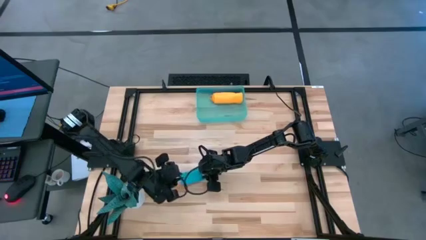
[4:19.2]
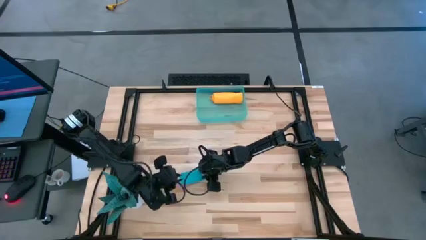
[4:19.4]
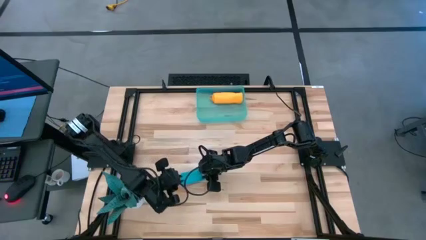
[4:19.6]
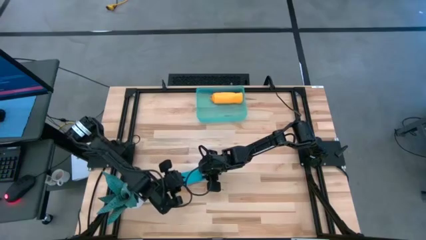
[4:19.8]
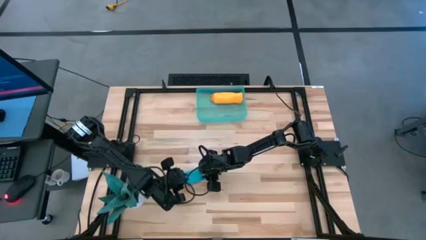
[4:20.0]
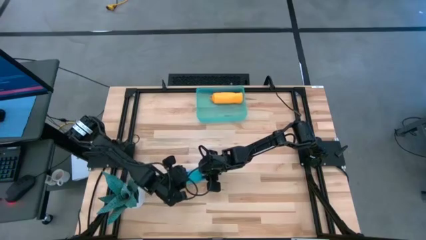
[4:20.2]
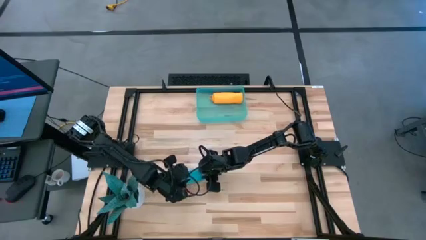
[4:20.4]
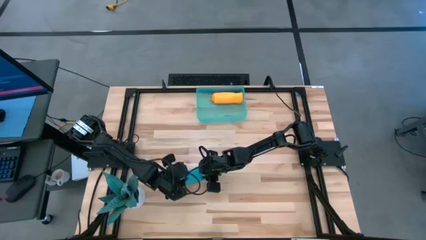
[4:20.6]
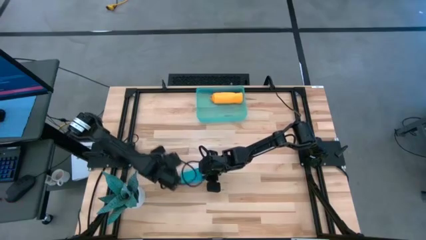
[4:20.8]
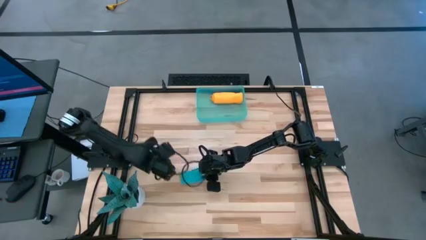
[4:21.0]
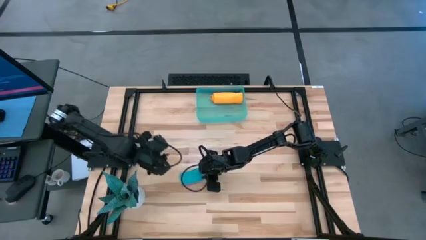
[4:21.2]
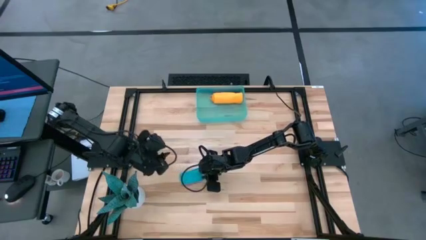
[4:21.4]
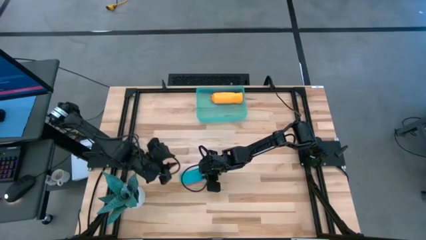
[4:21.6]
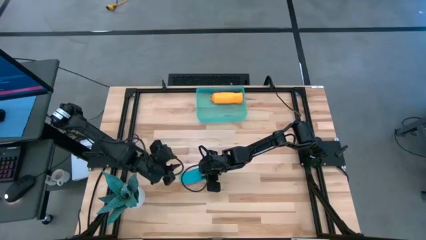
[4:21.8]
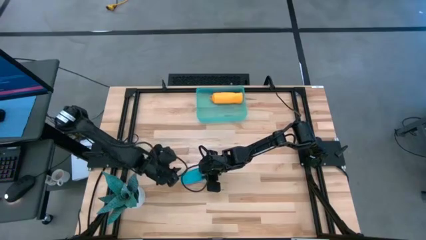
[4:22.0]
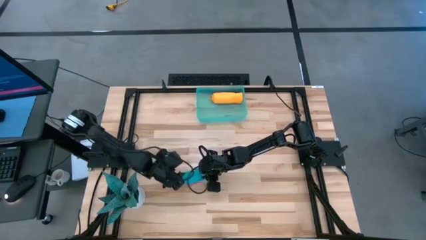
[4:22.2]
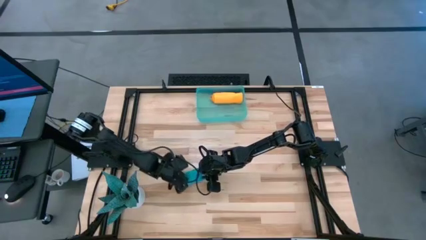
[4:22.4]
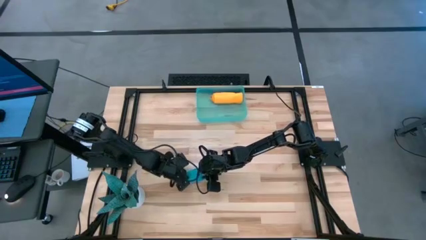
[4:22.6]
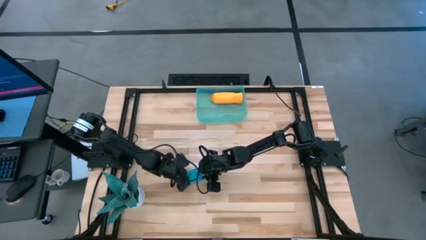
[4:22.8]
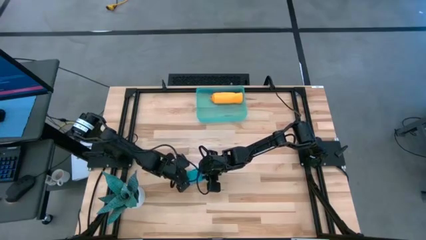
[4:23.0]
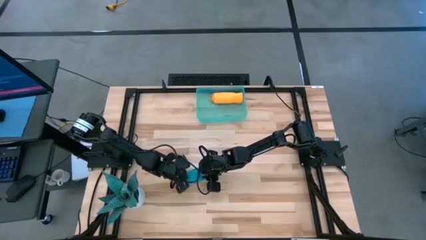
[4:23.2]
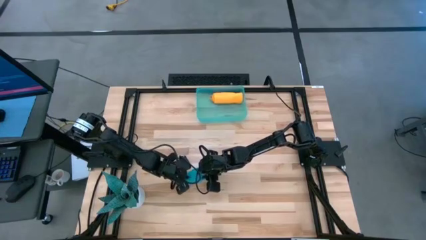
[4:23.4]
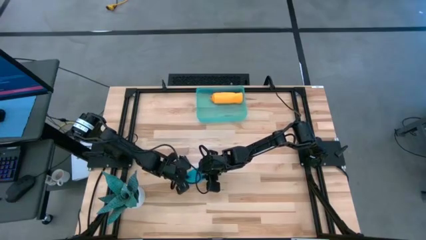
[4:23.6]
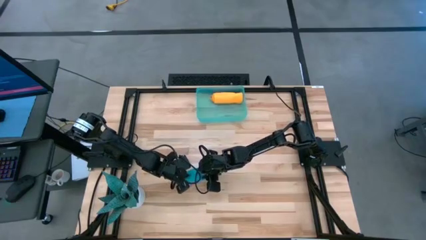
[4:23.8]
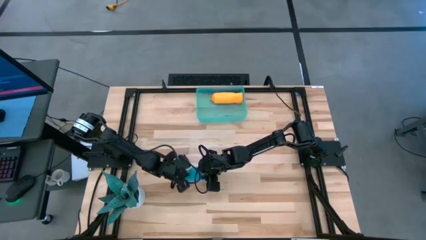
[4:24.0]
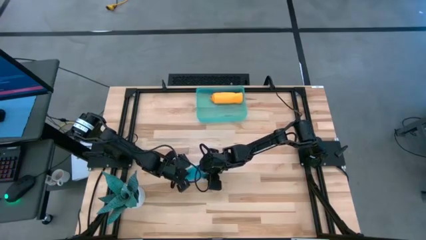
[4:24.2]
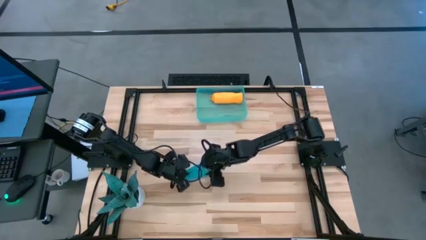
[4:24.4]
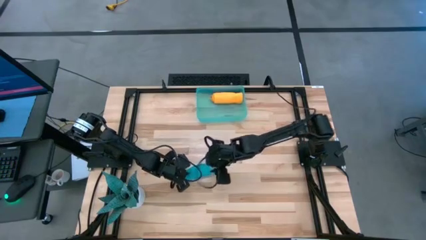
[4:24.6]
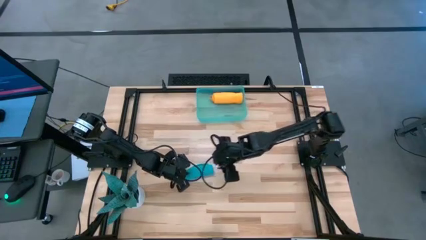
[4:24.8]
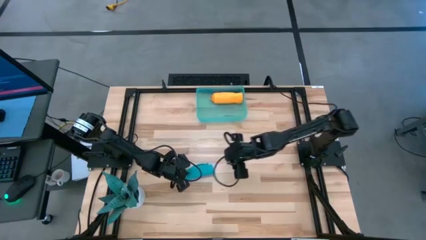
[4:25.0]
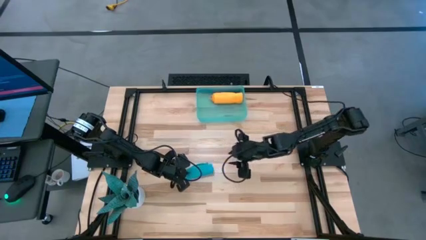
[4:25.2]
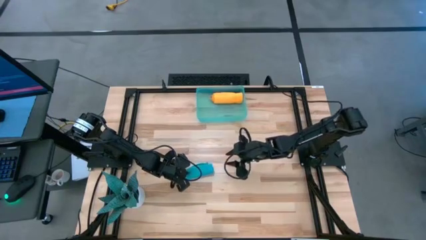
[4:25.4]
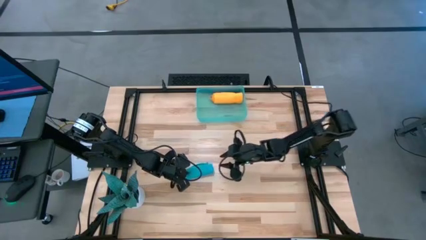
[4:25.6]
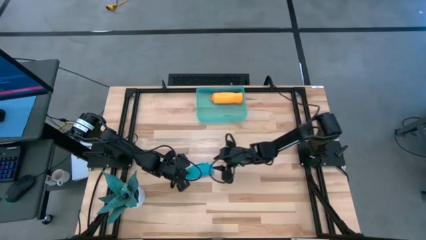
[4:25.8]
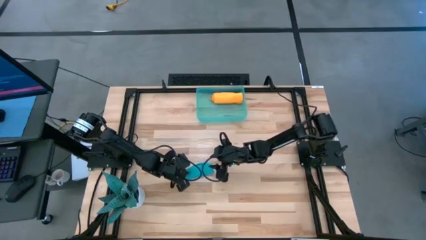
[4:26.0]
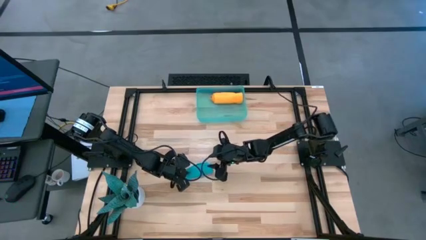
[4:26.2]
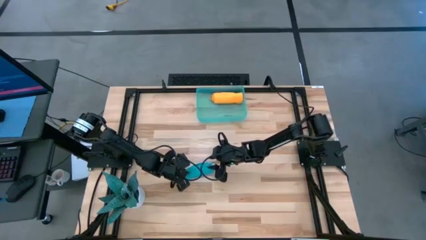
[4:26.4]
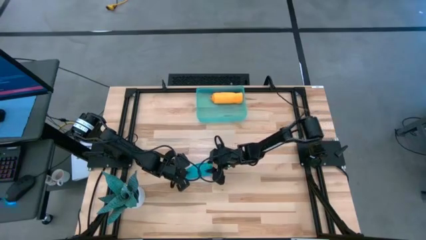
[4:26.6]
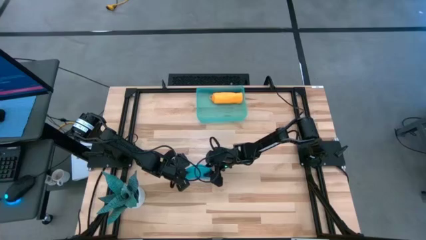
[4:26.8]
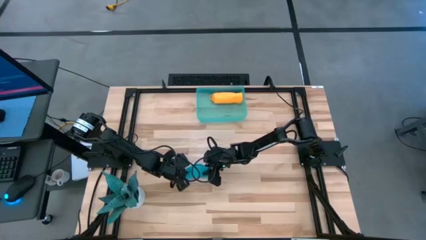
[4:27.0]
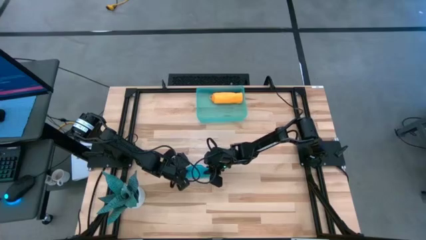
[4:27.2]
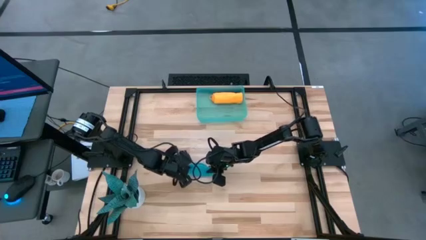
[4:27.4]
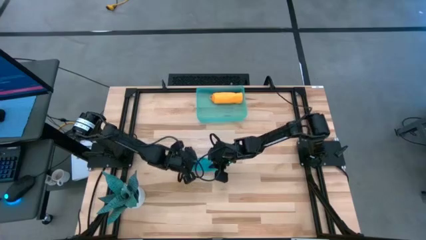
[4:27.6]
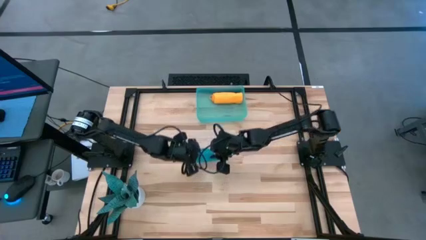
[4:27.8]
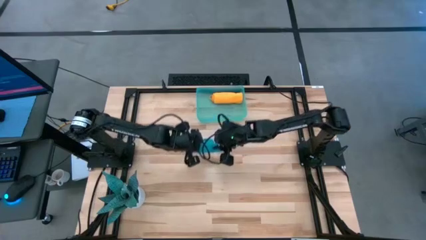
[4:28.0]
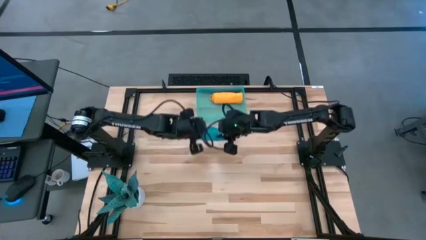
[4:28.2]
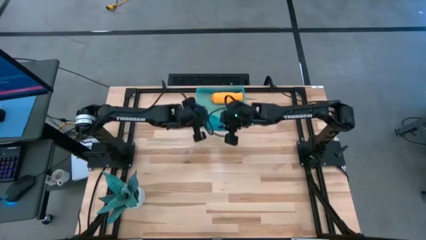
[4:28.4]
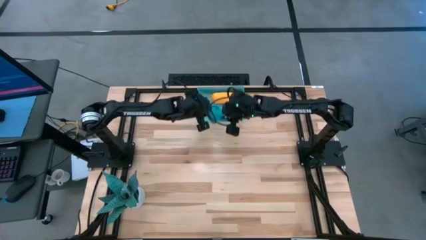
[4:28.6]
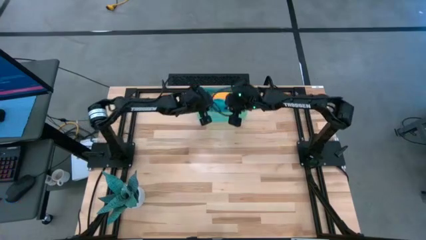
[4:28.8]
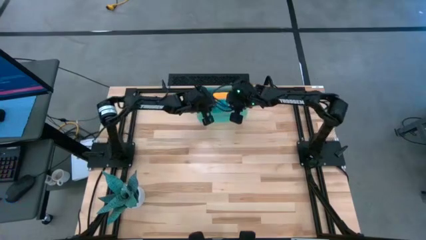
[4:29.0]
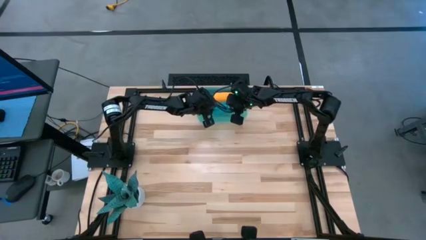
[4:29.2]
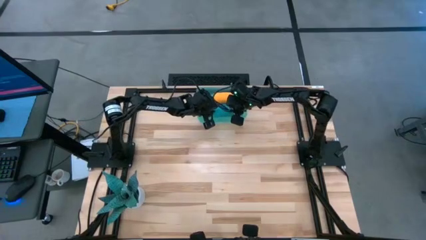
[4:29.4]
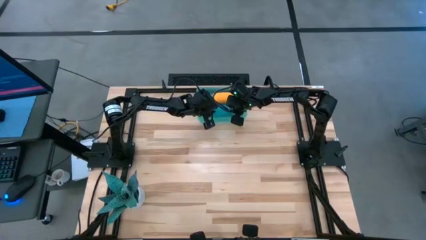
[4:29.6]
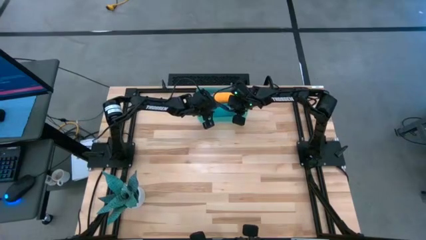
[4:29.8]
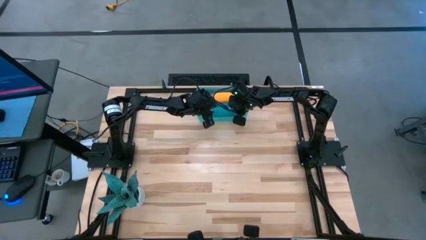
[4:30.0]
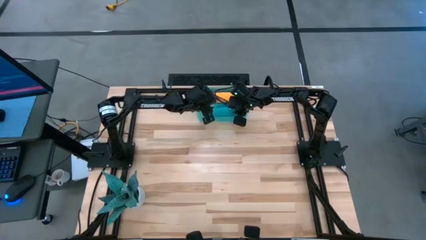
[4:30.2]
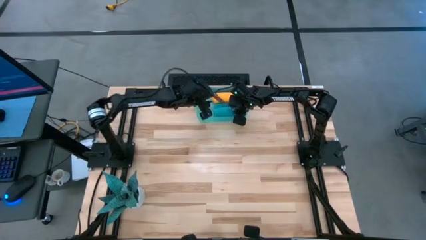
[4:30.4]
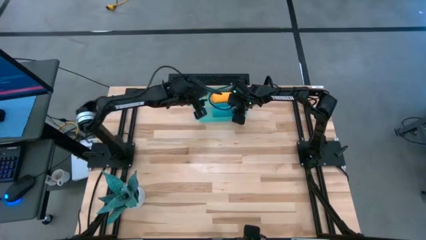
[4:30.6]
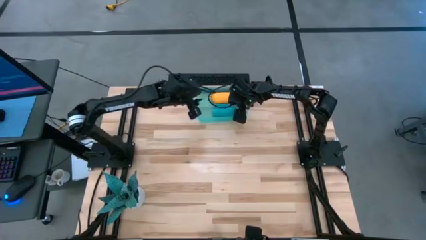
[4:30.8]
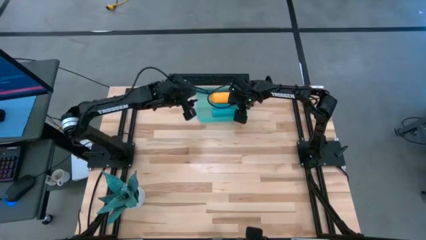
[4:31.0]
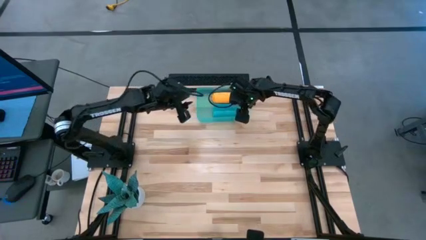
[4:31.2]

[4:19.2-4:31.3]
Task: Roll microfiber towels into tight, uniform cylinder then place into a basket
Put the rolled blue microfiber cloth into the blue bin

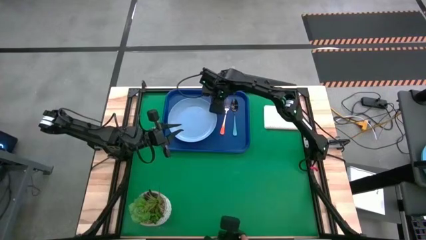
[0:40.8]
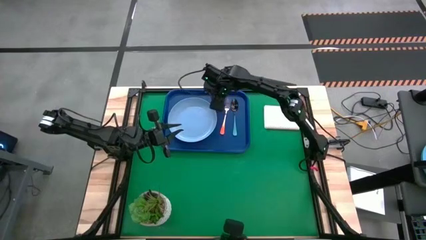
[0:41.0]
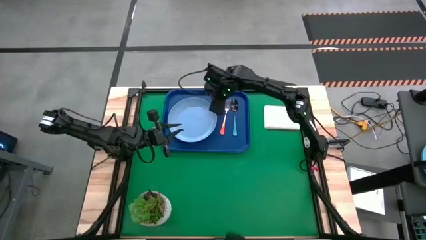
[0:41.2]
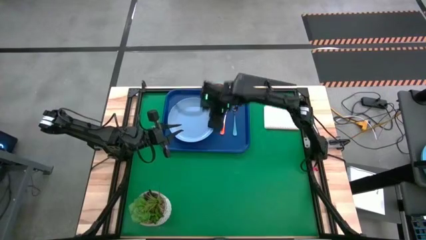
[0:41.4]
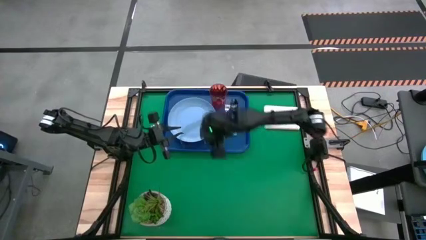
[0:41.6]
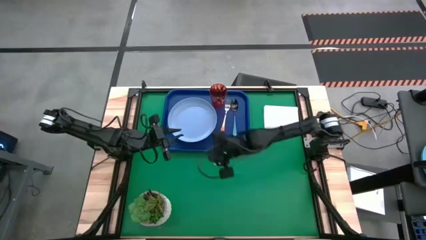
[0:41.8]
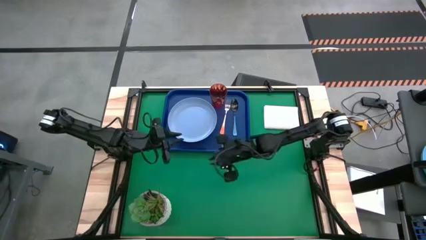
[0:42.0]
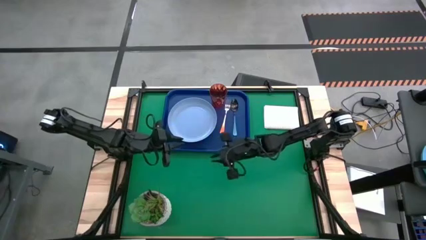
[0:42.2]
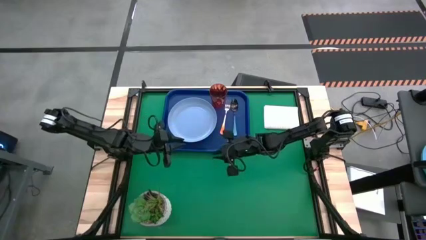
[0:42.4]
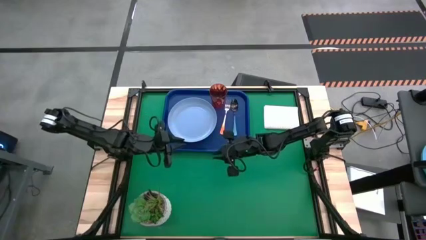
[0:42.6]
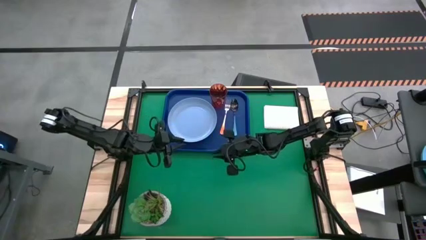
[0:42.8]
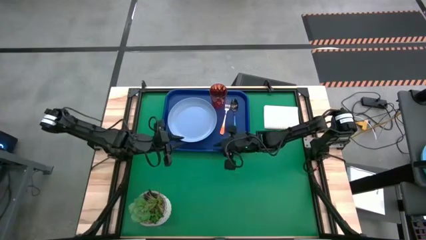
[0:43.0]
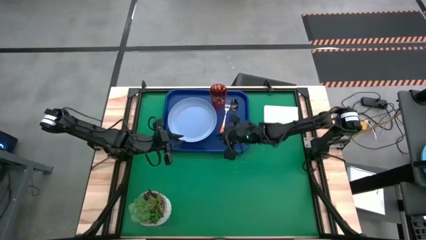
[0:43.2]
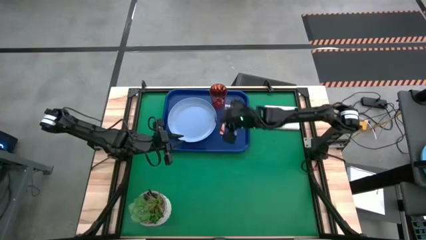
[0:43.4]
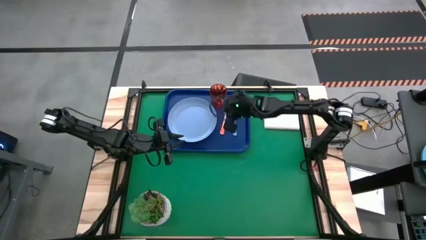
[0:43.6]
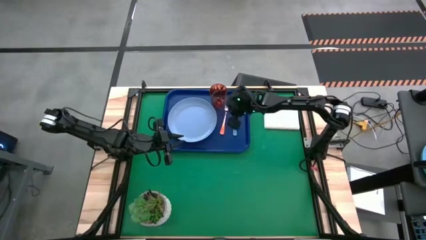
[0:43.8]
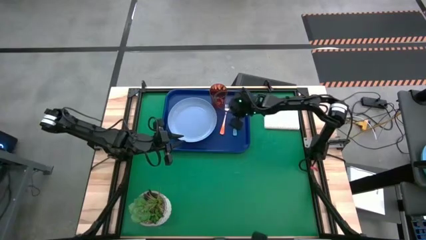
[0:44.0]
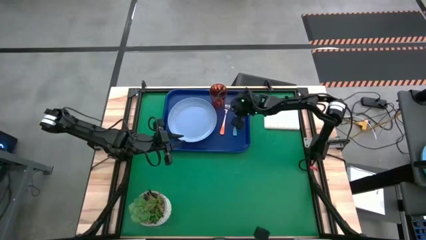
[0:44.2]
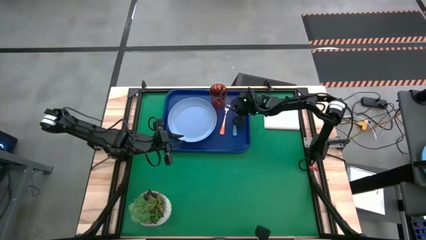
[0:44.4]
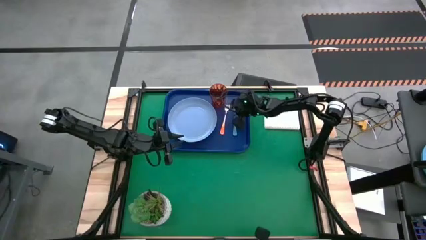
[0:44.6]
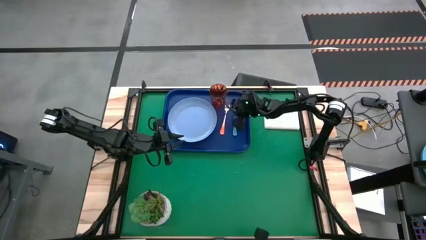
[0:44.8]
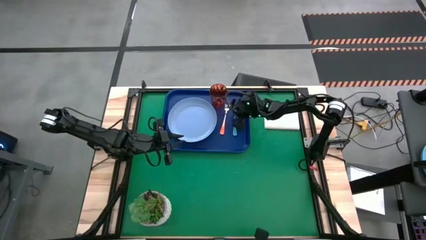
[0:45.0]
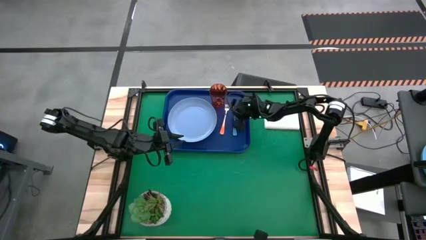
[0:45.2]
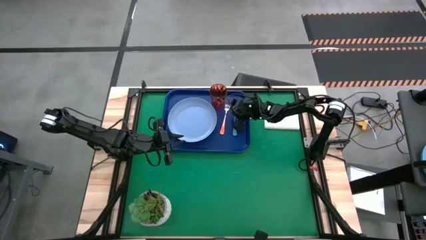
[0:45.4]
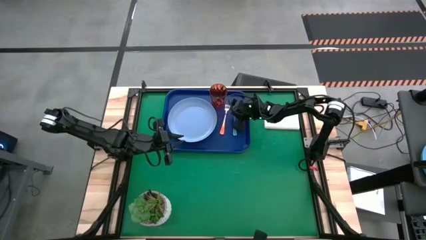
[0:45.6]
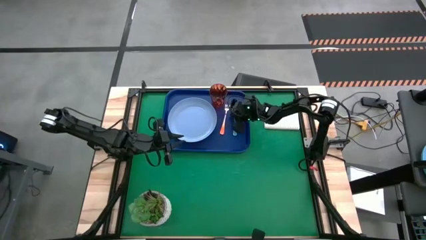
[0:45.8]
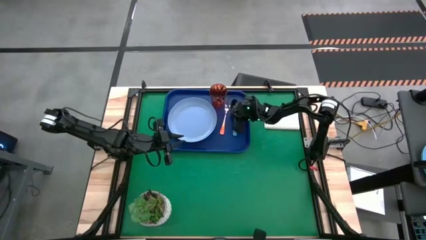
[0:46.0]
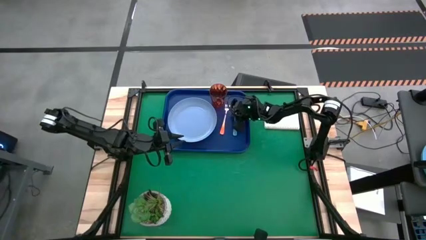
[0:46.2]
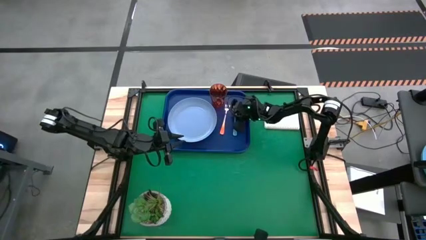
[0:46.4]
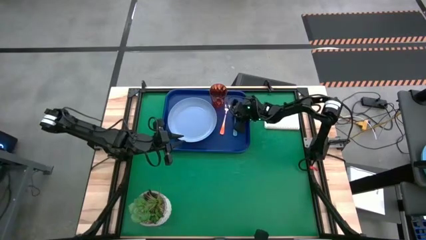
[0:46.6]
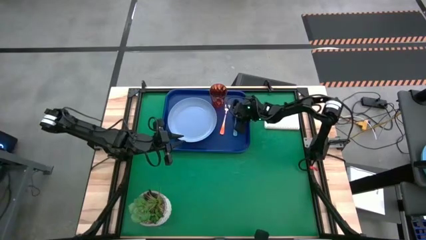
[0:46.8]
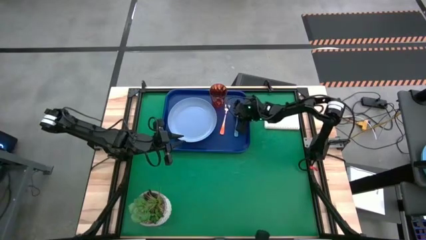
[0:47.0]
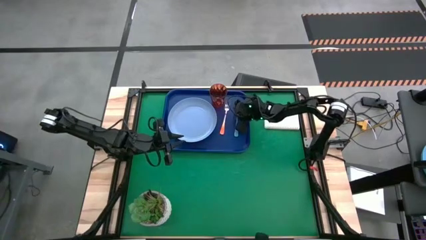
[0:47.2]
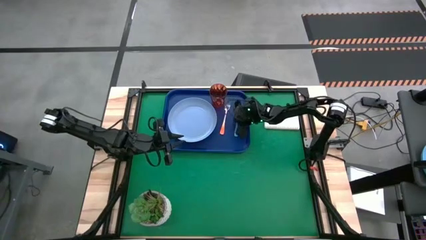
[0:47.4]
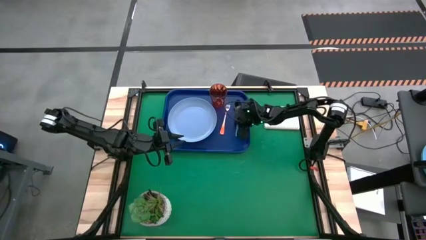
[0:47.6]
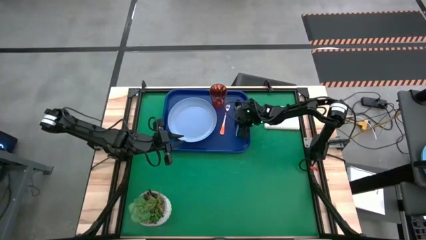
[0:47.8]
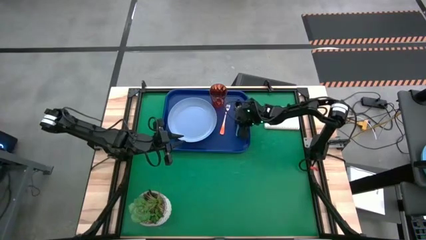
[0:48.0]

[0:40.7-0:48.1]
Task: Pick and place plate/cup/fork/spoon on tray
Adjust the blue spoon on the blue tray
